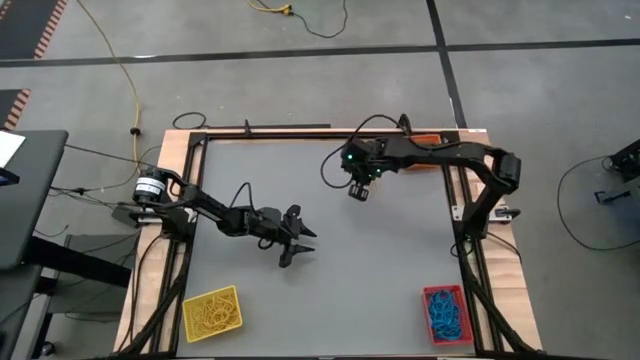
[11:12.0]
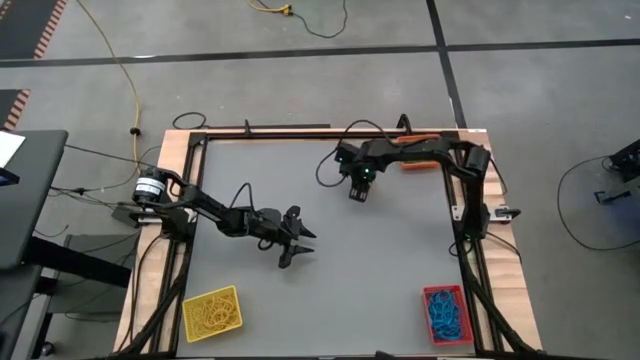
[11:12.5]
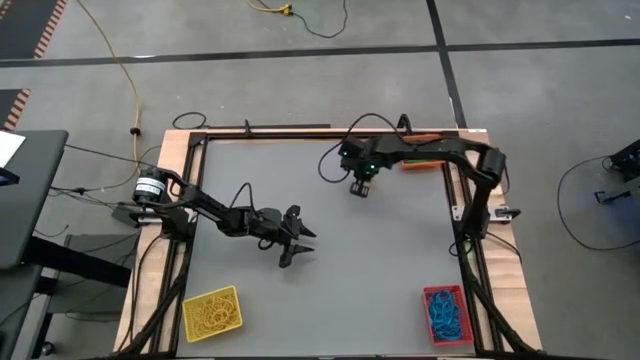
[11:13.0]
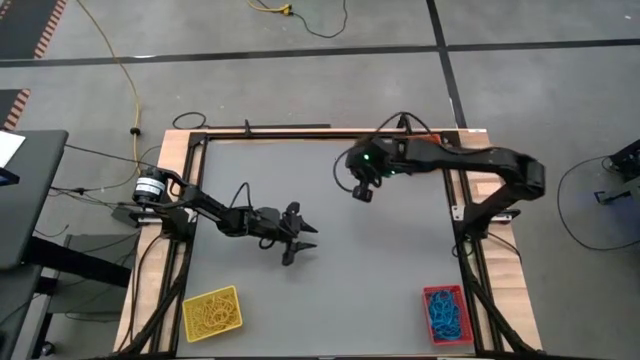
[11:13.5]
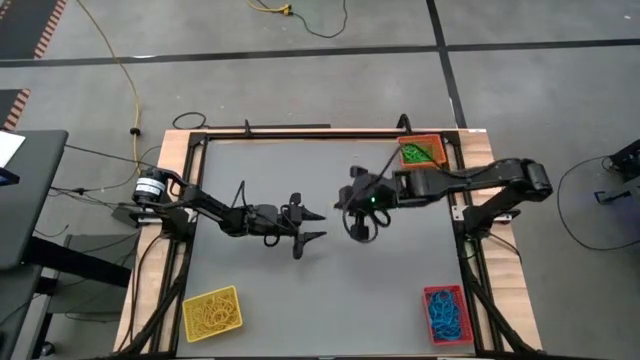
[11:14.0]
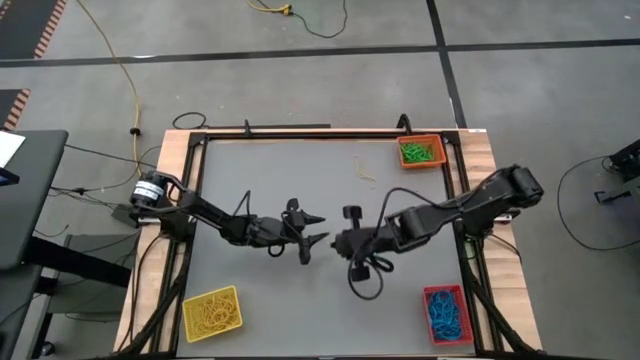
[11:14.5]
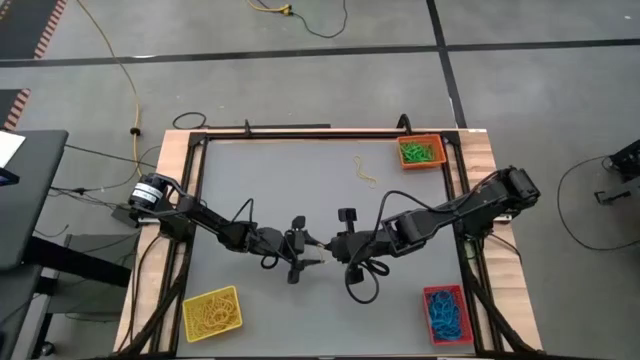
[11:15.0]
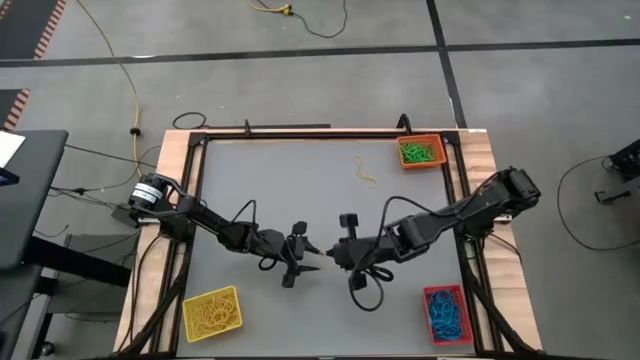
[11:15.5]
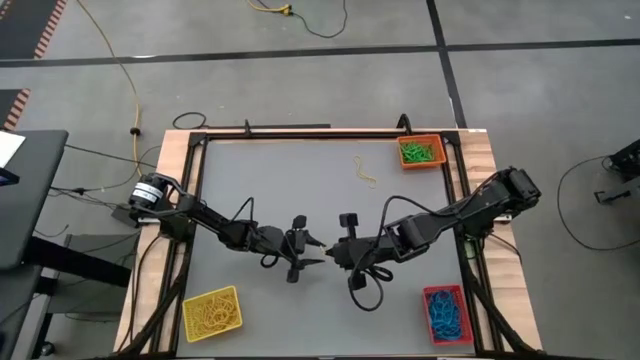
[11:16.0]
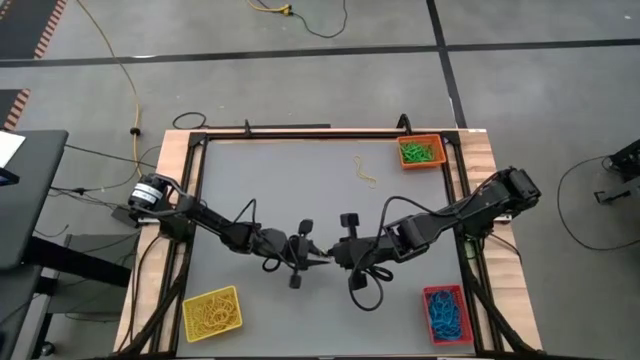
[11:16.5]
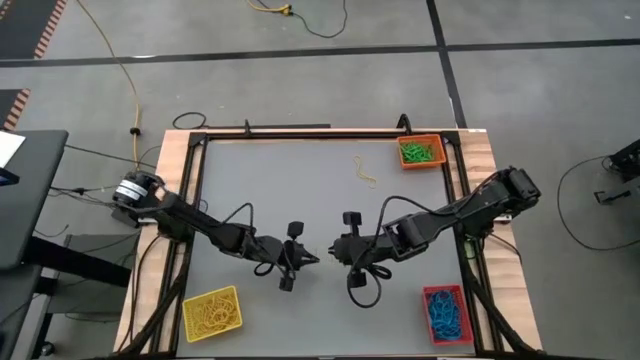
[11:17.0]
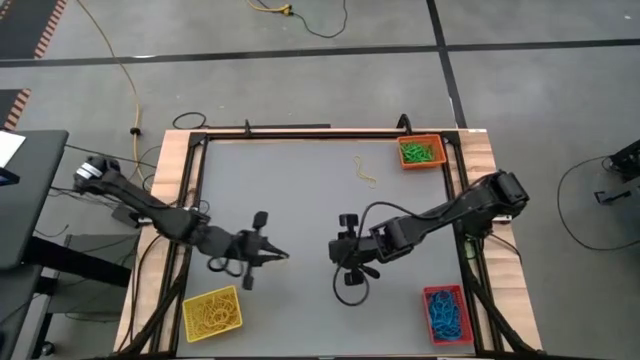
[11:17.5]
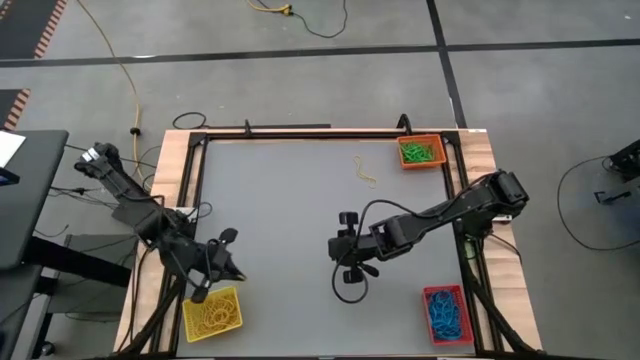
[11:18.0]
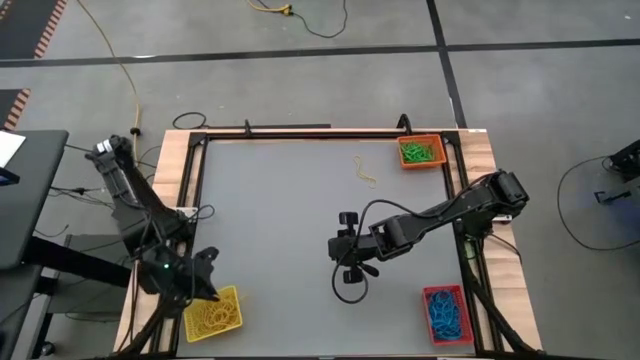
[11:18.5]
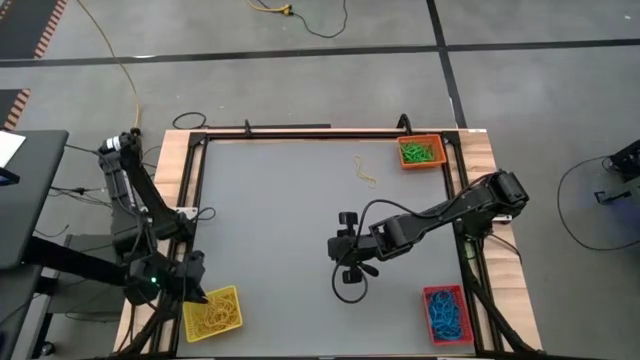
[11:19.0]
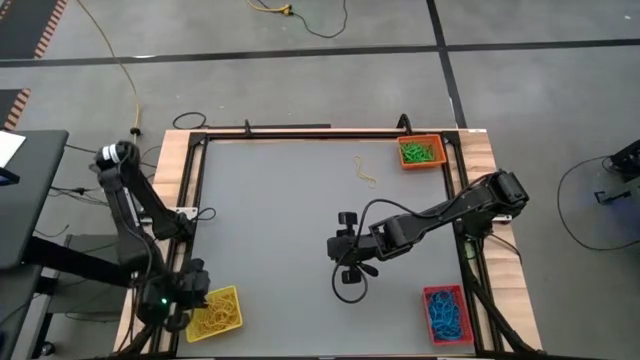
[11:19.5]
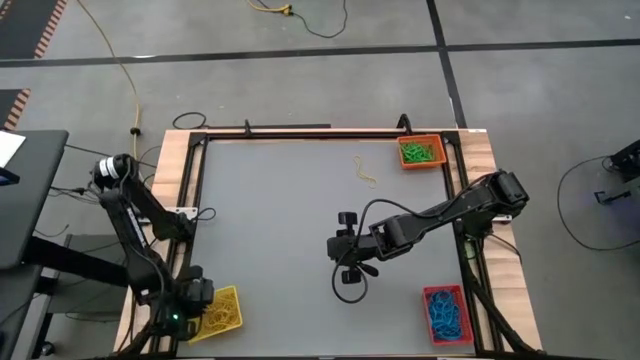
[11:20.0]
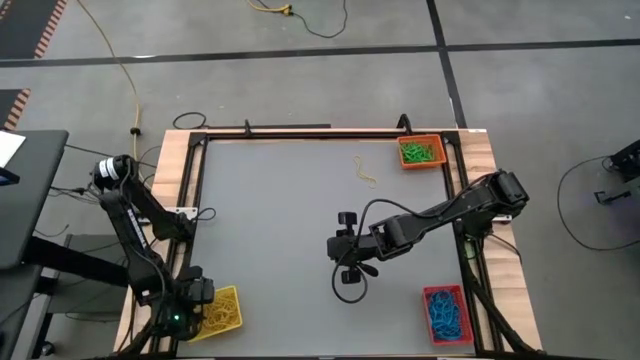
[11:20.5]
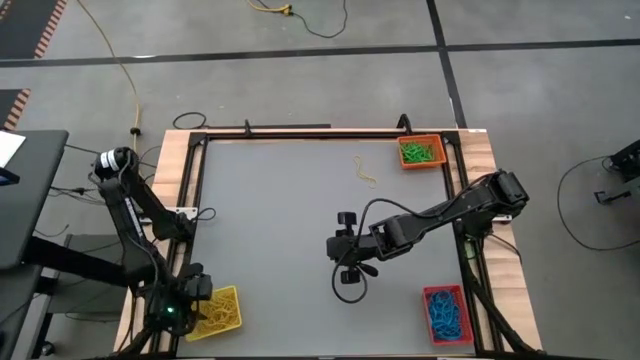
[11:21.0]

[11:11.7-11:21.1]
Task: Sort rubber bands into baskets
Put the yellow rubber band into the yellow bin

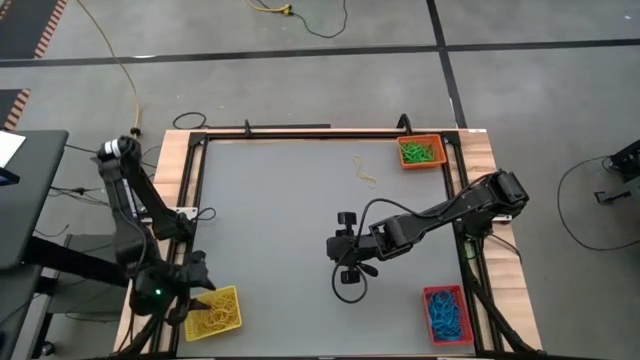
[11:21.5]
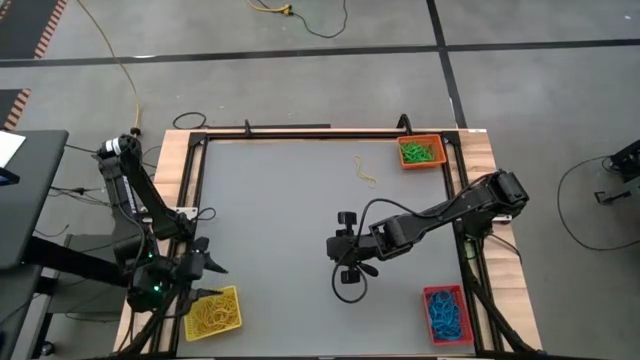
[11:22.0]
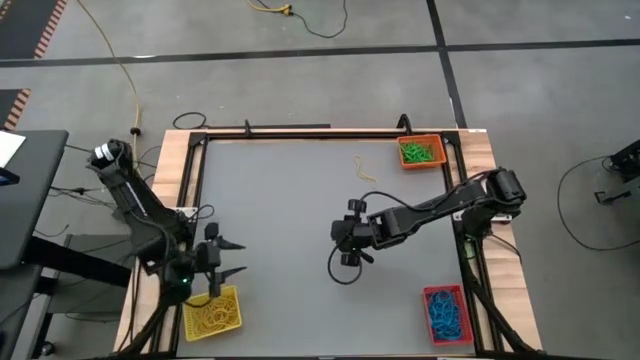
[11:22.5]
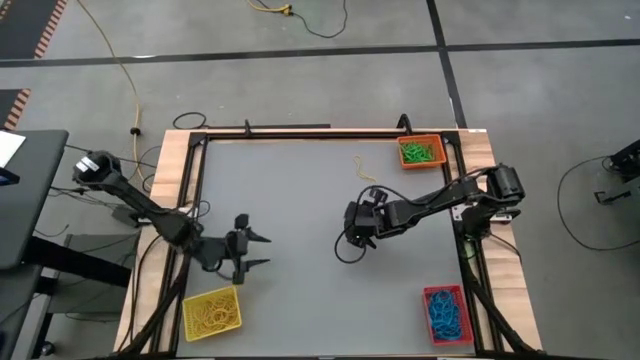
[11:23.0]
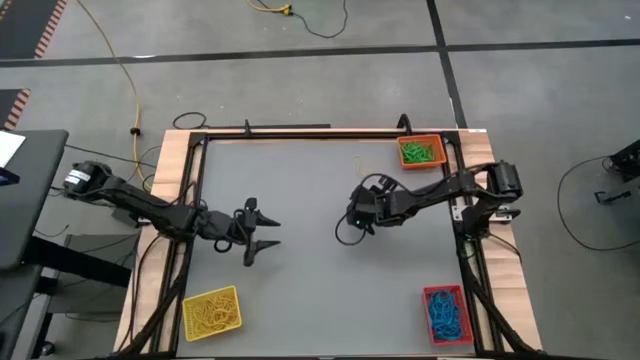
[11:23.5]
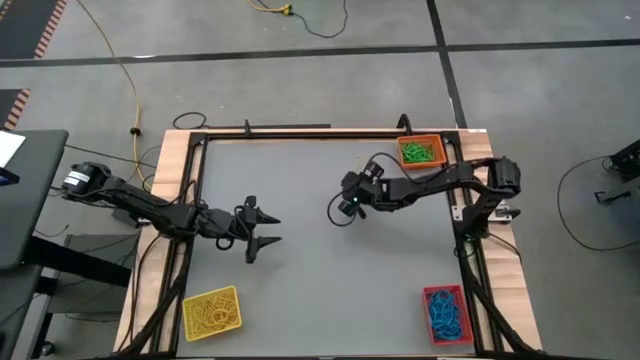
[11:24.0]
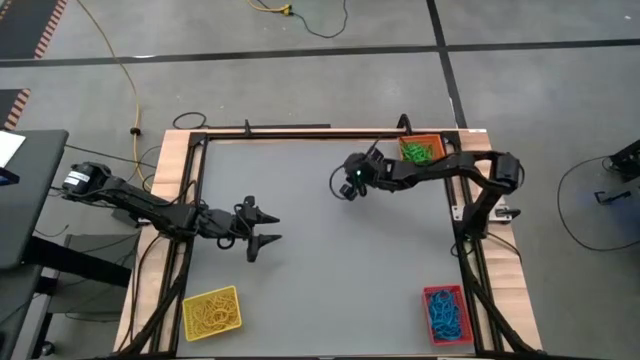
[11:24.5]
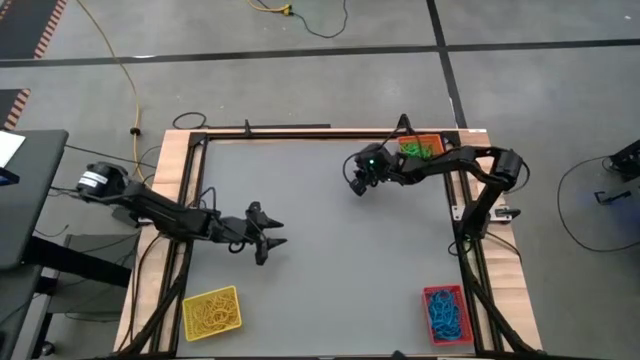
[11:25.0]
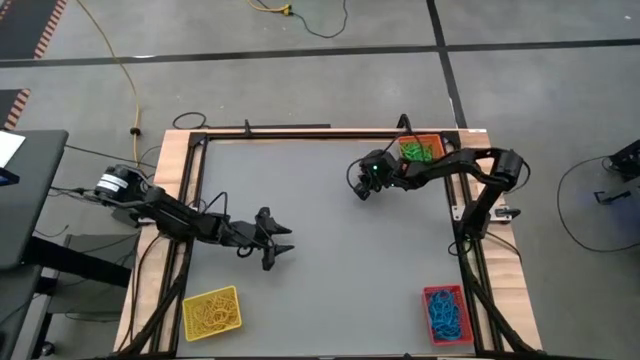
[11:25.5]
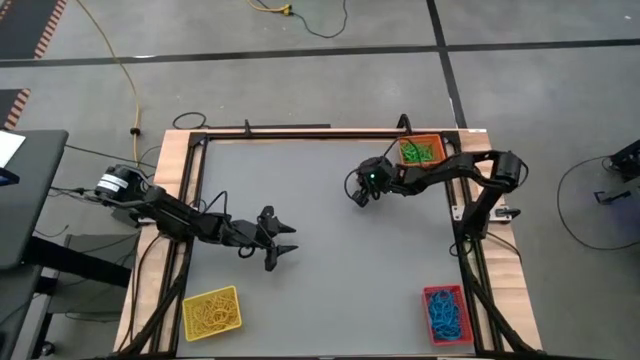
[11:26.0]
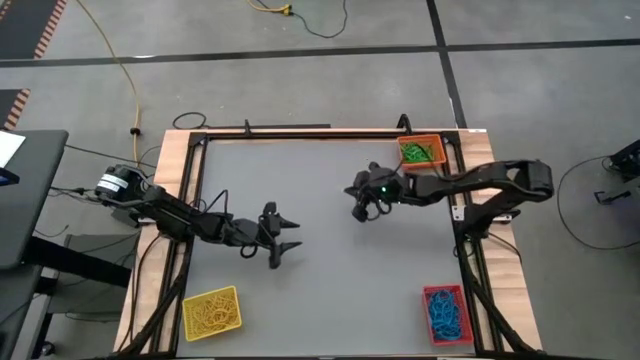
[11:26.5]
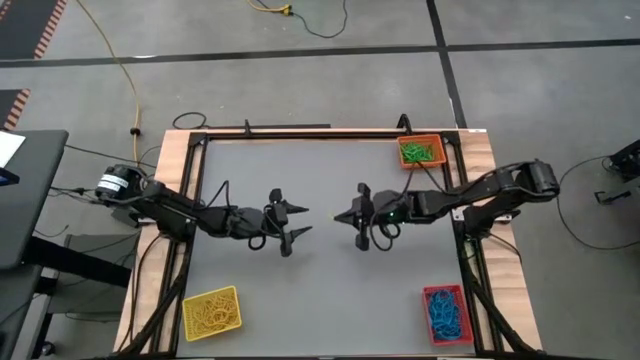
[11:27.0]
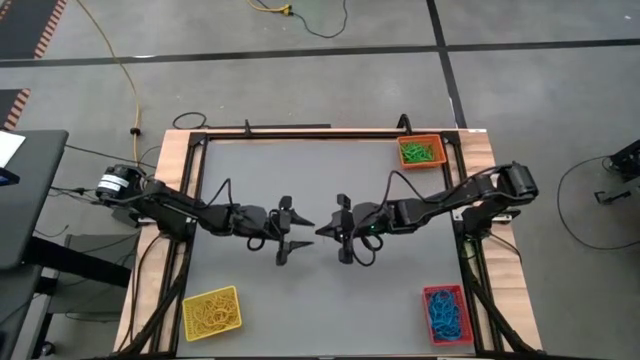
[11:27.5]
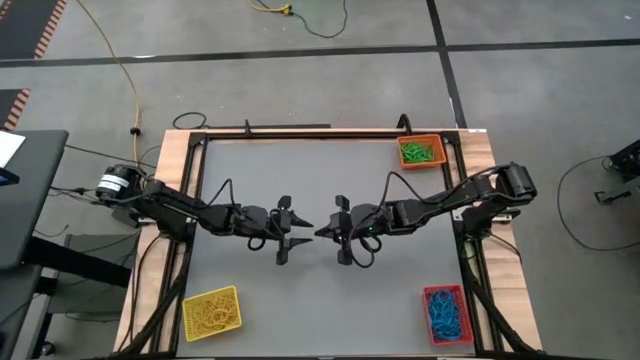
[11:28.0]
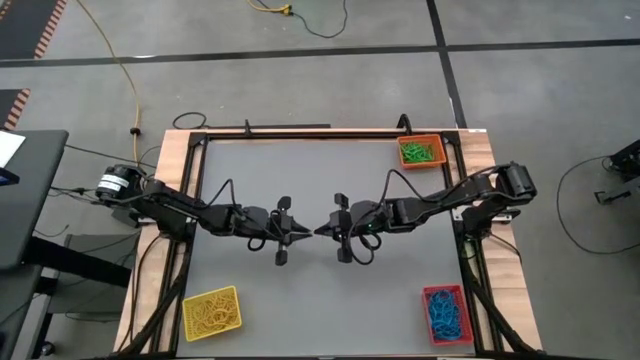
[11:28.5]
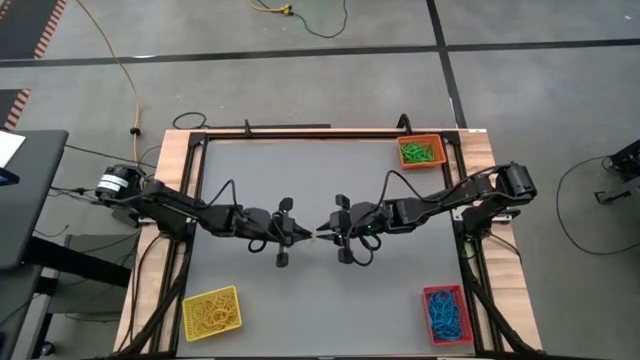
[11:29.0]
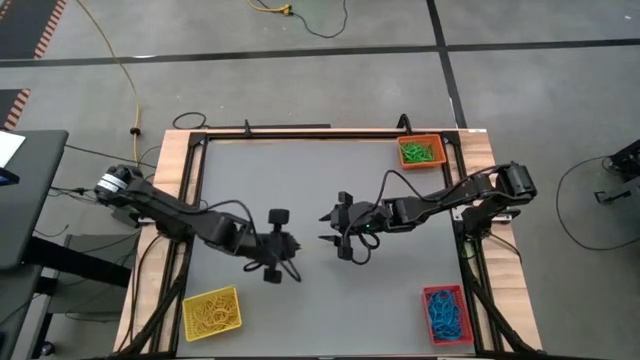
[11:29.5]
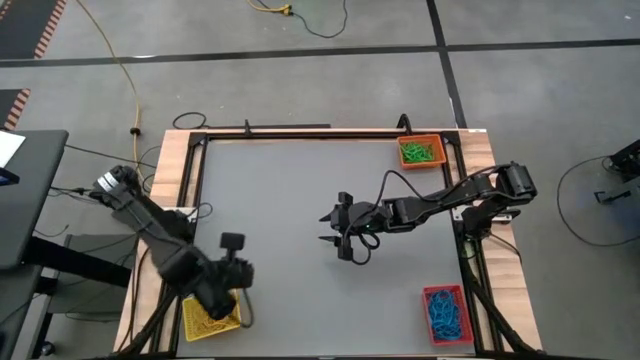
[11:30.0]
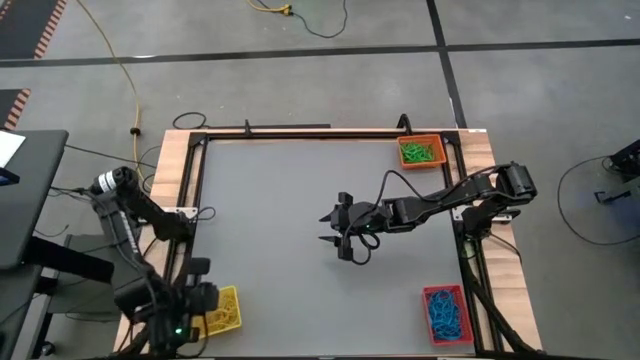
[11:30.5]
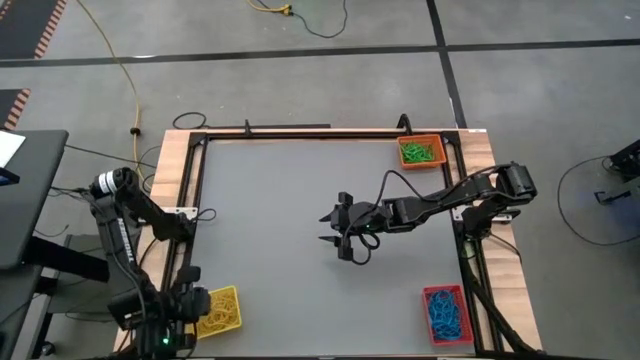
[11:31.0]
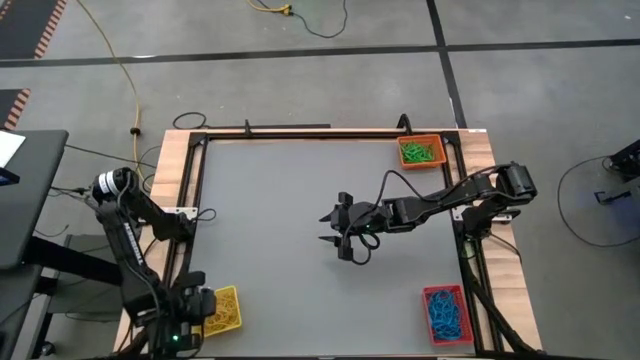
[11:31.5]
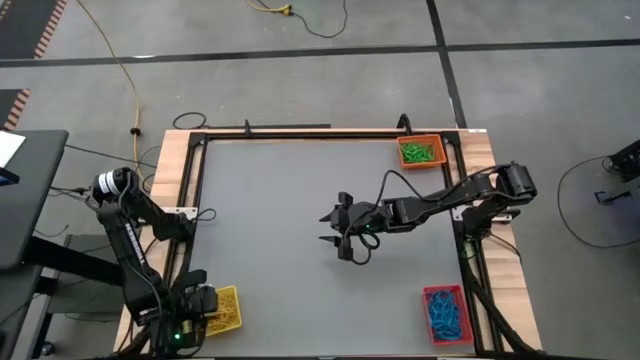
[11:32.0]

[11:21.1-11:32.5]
Put the yellow rubber band into the yellow bin
